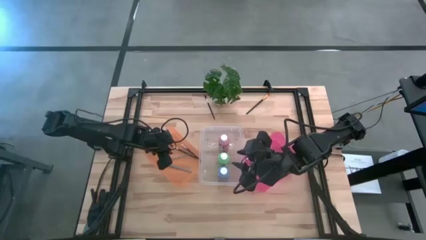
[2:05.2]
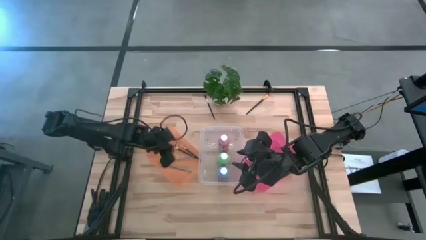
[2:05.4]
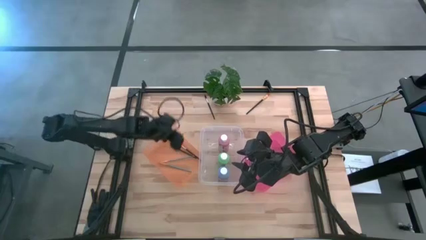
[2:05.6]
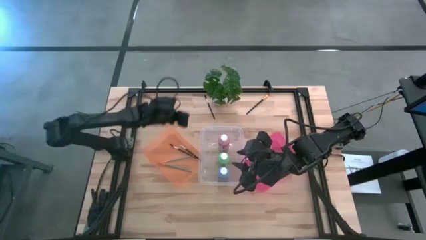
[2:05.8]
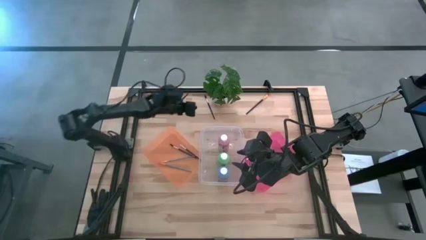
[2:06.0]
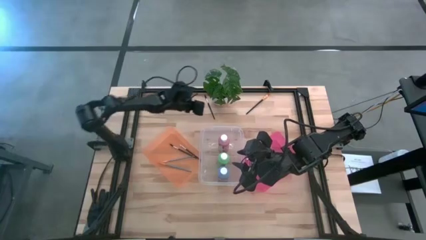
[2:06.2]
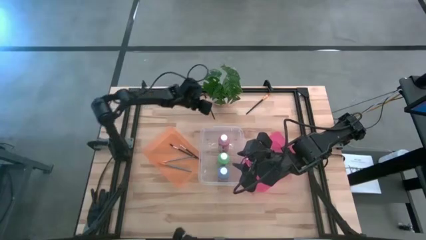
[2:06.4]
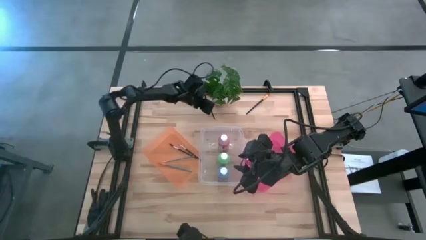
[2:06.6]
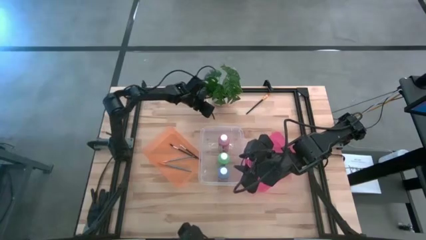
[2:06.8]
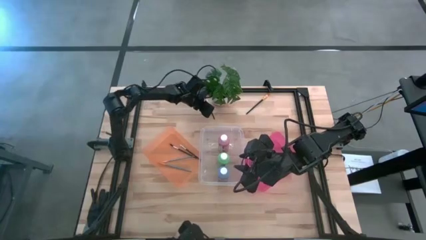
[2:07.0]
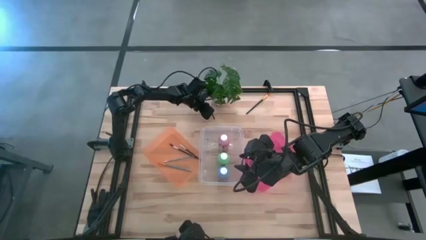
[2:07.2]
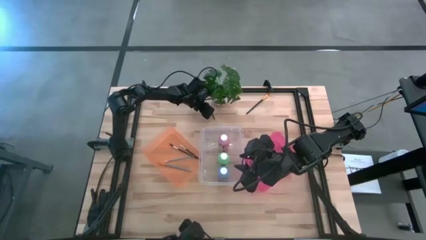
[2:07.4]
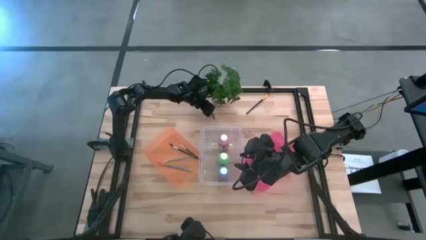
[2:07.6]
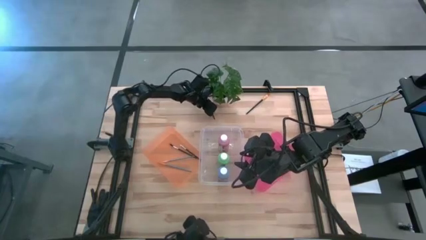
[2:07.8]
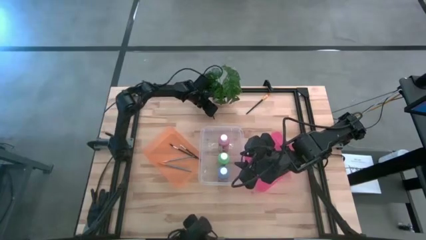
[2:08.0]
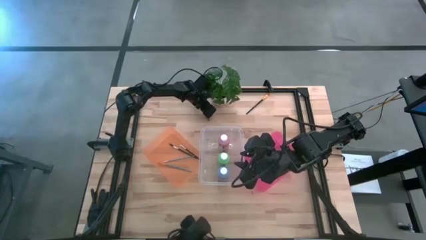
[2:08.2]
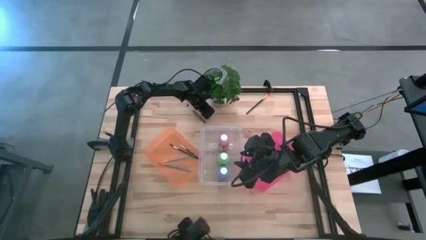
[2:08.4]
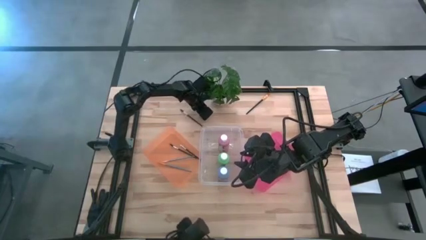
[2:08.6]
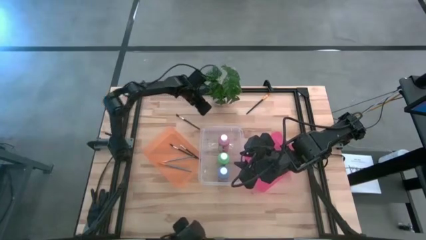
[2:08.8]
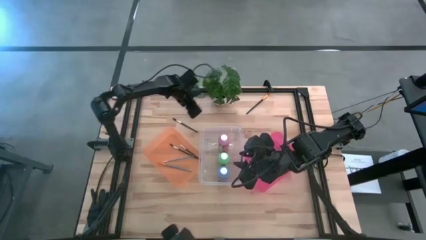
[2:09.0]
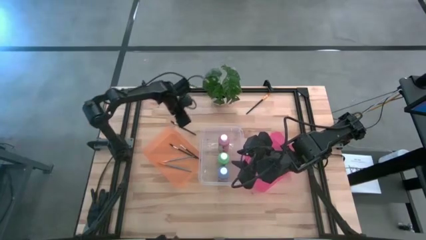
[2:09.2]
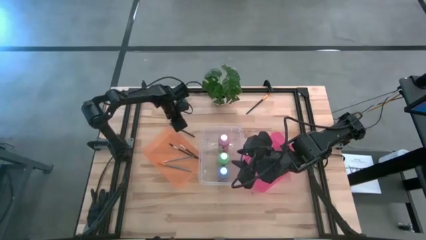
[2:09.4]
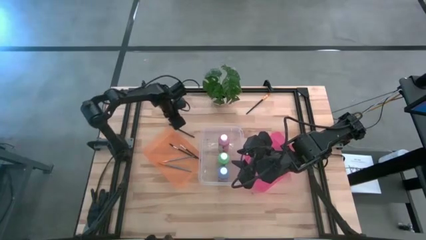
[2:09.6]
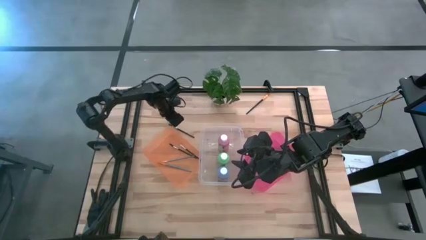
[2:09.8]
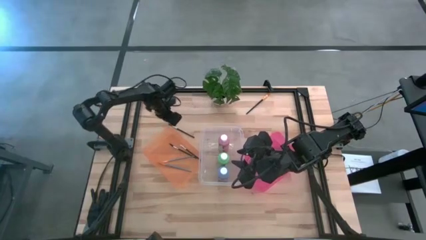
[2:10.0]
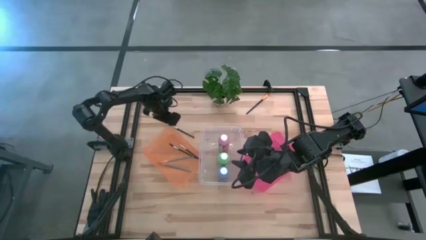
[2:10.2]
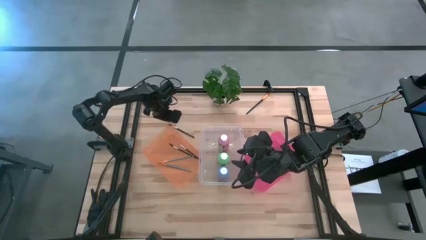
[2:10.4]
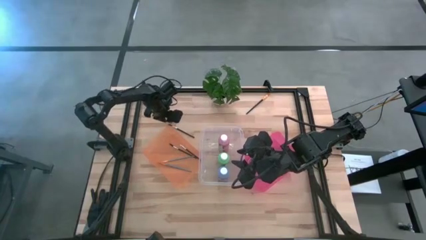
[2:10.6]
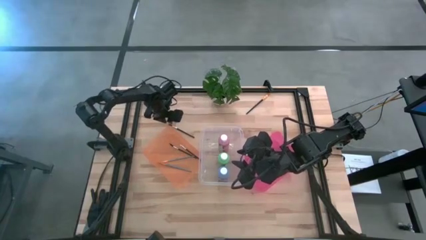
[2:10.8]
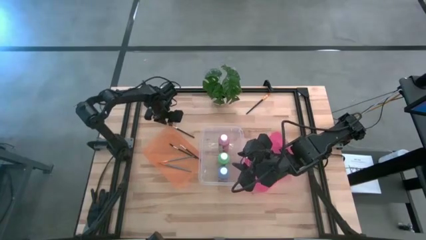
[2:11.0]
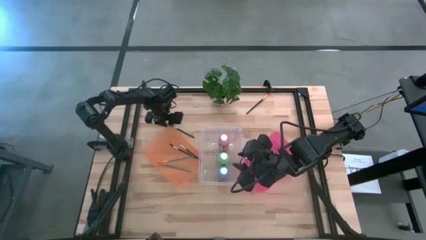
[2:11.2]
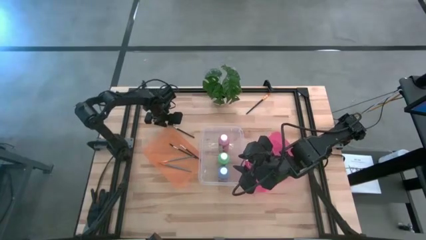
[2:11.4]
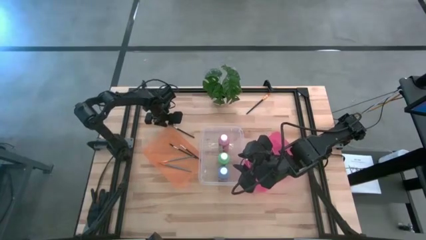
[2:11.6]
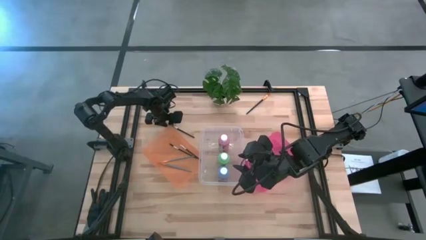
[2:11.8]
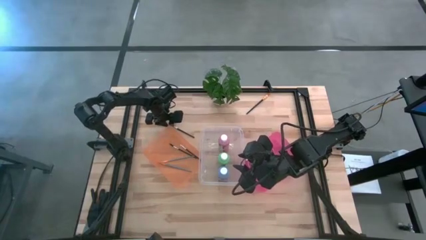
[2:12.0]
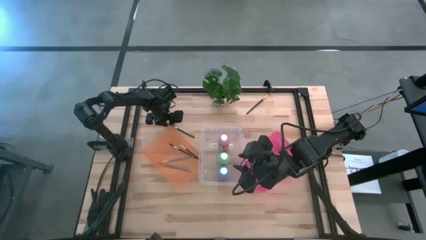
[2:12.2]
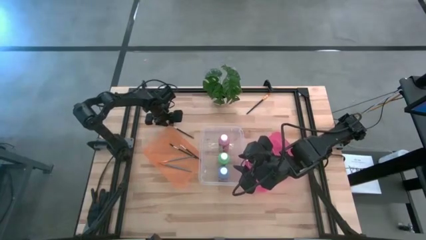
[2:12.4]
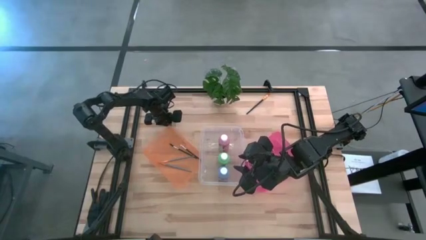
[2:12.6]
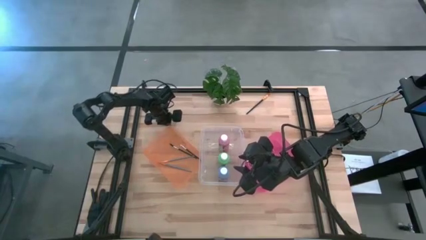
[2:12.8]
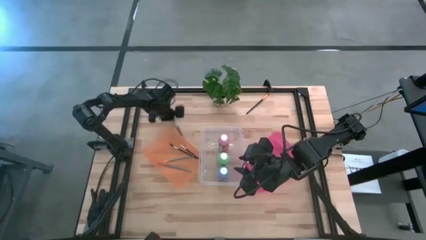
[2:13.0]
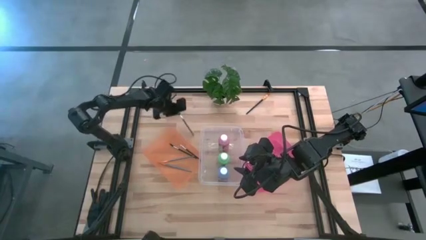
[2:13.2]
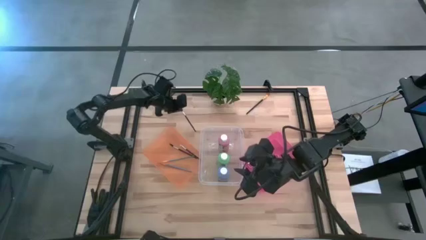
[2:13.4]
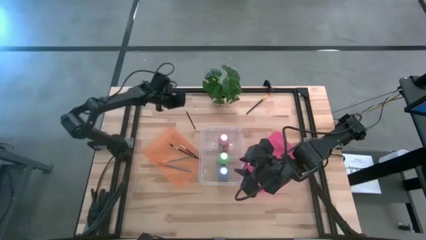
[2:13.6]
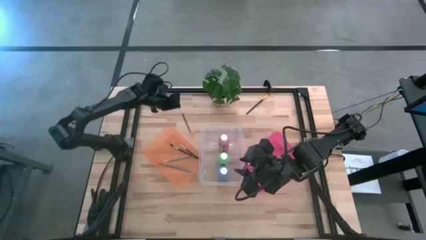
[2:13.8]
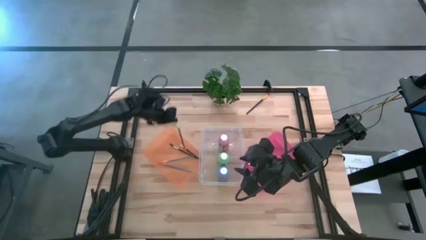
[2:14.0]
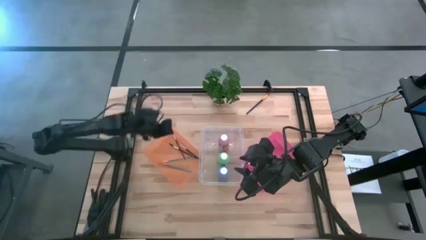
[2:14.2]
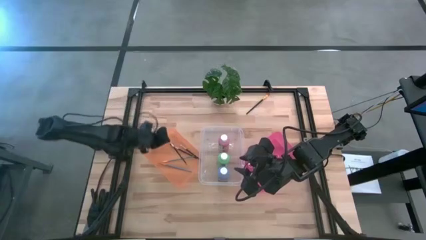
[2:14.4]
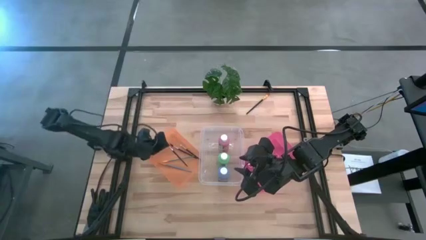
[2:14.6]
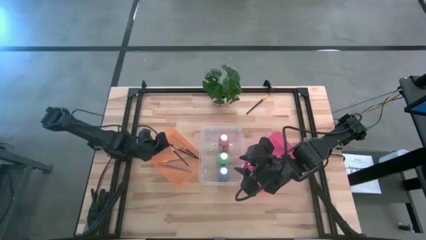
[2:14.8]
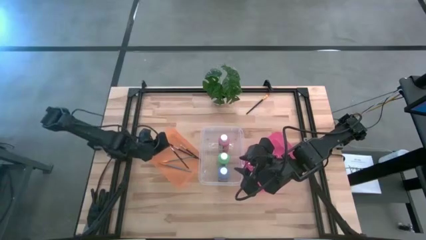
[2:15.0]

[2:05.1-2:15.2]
Task: Pick & Place Paint Supplies
Put the black lash brush into the orange bin

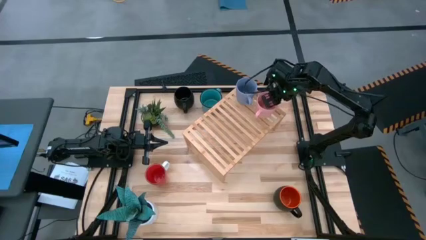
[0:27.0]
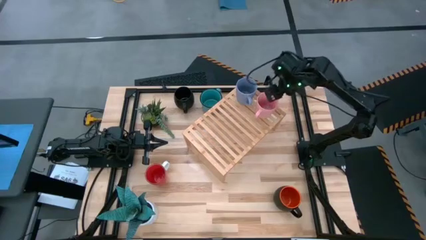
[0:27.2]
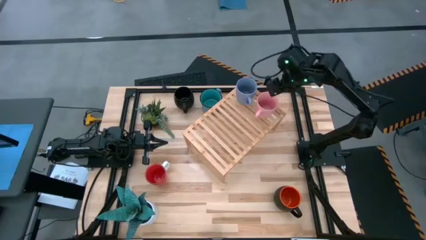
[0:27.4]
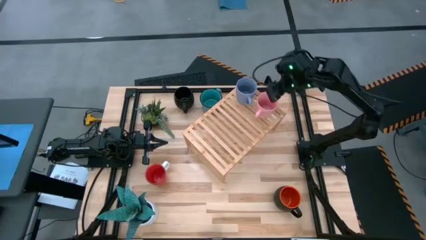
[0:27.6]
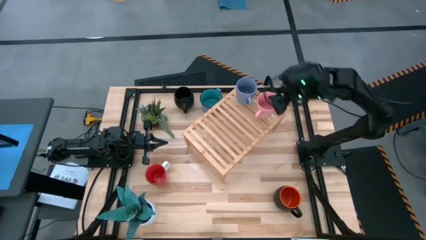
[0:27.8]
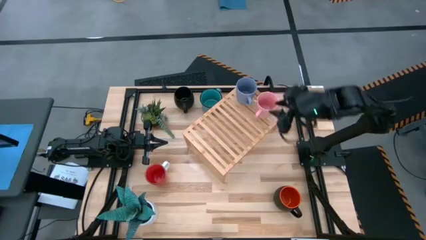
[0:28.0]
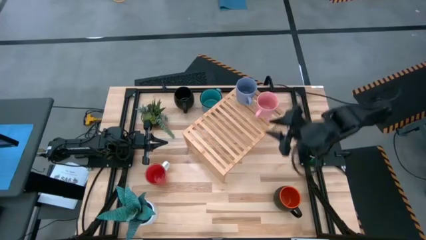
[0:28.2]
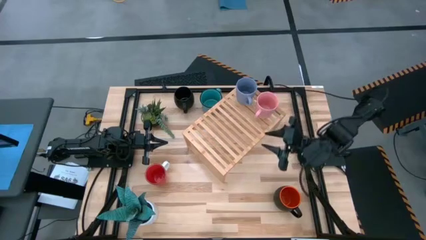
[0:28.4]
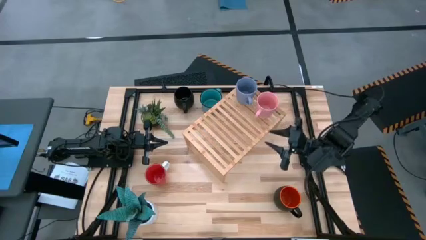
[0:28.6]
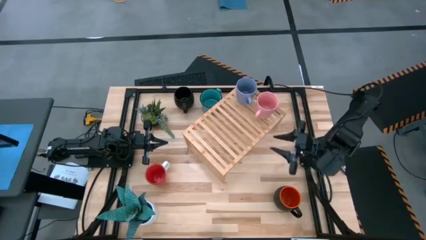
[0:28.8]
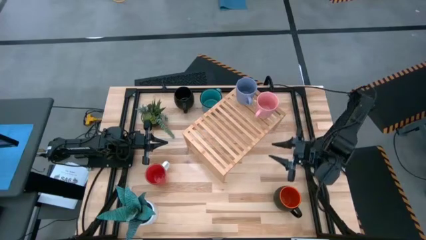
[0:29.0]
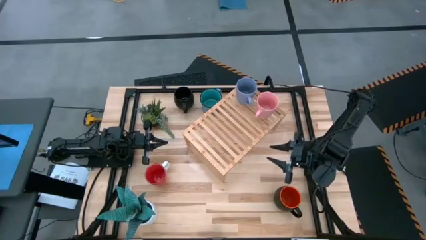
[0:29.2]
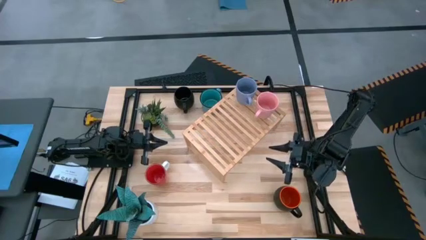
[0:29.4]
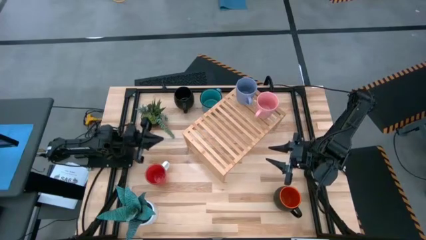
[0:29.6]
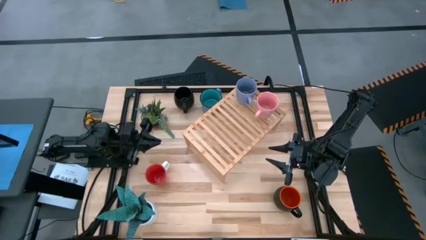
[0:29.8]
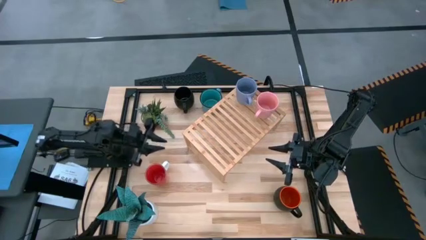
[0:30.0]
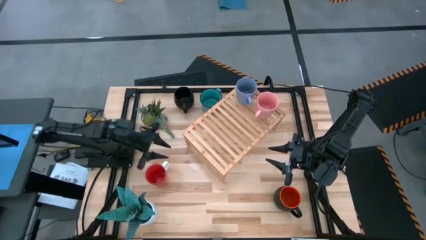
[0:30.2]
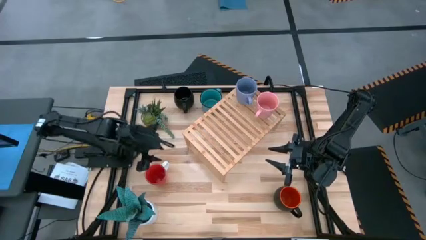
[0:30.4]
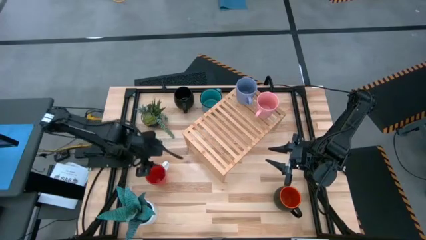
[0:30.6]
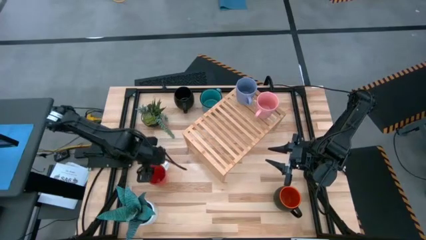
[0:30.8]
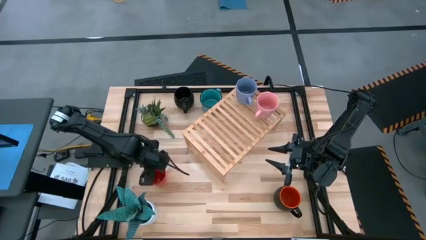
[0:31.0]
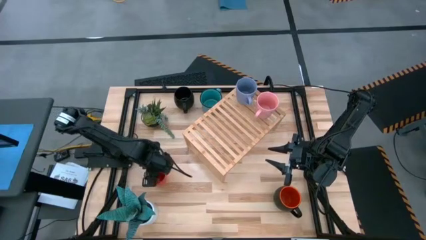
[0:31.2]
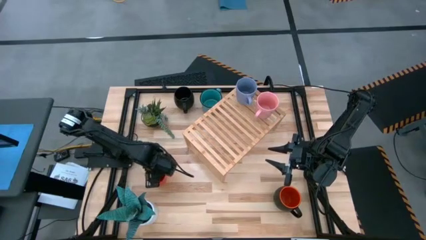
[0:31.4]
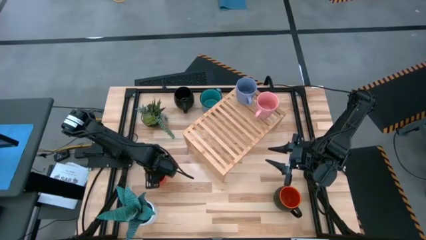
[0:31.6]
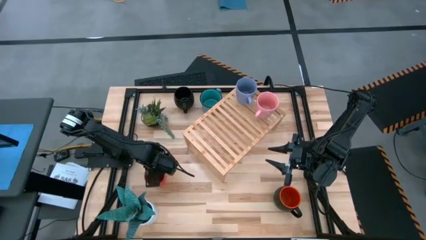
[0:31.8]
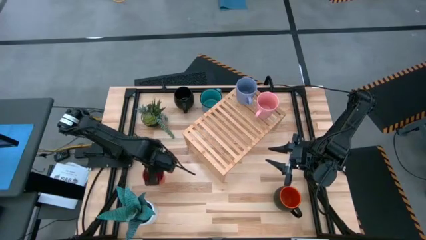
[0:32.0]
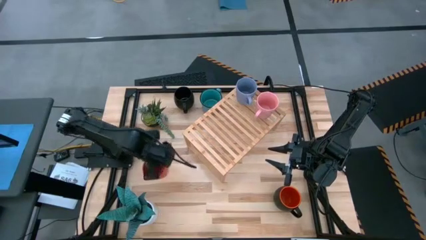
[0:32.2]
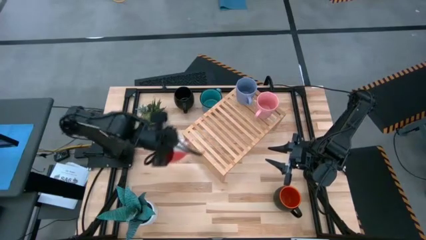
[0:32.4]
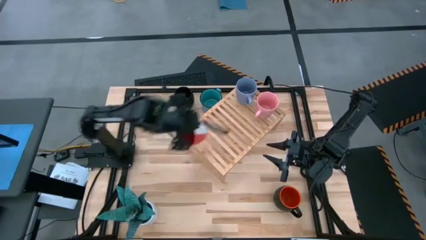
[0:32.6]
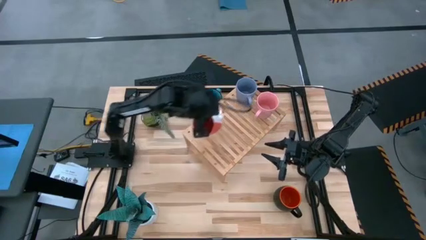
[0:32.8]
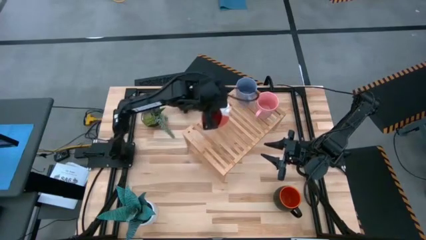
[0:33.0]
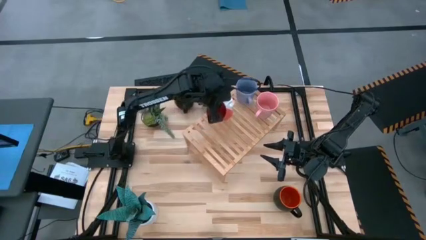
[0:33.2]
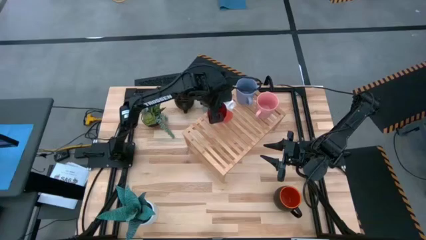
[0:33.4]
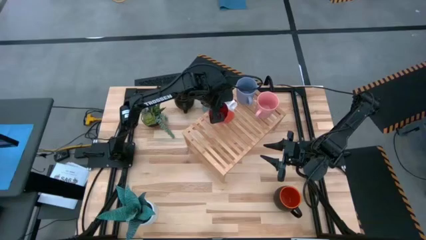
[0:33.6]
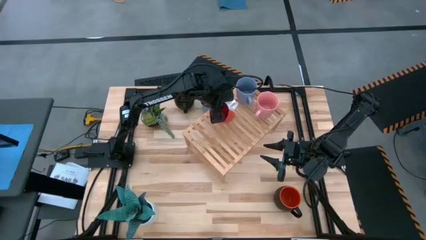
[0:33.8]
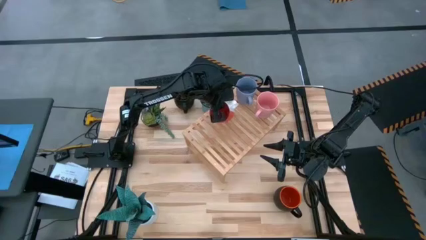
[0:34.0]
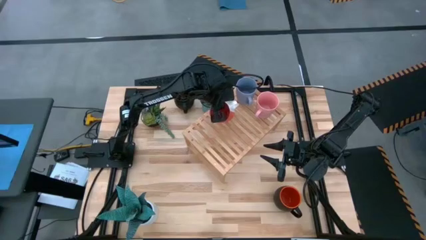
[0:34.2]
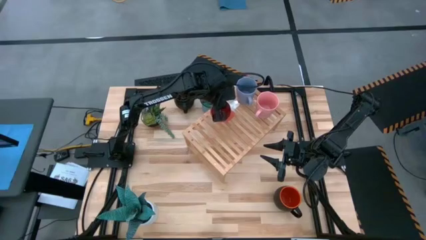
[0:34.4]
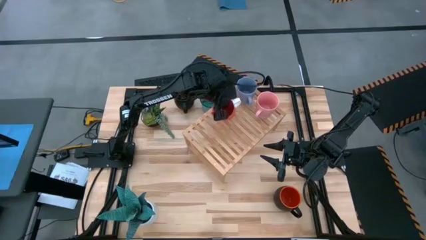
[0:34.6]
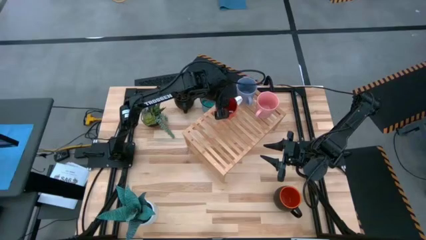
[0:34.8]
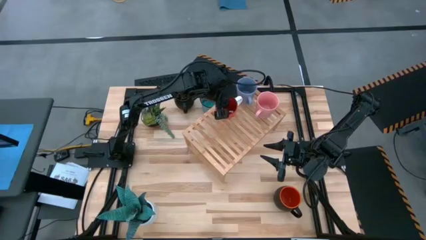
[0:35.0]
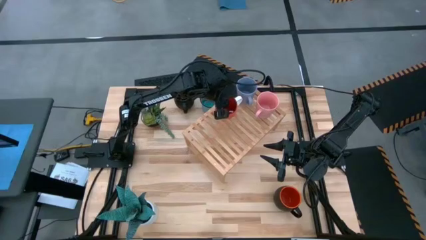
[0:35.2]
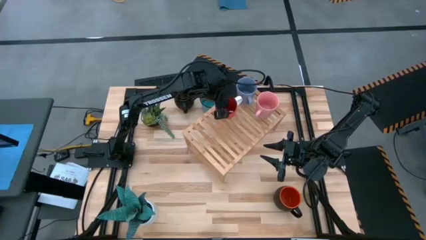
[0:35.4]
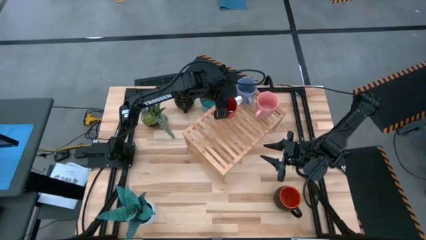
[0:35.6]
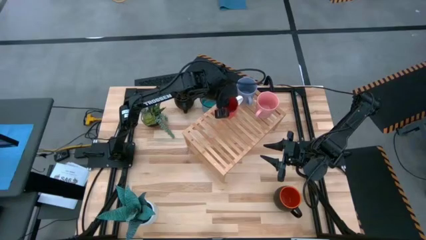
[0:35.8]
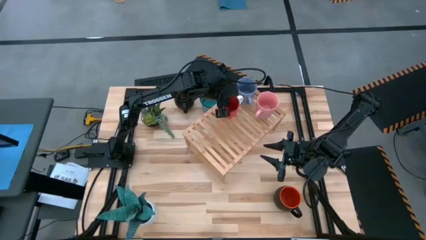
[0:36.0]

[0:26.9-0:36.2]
Task: Place coffee mugs
Put the orange mug on the shelf
